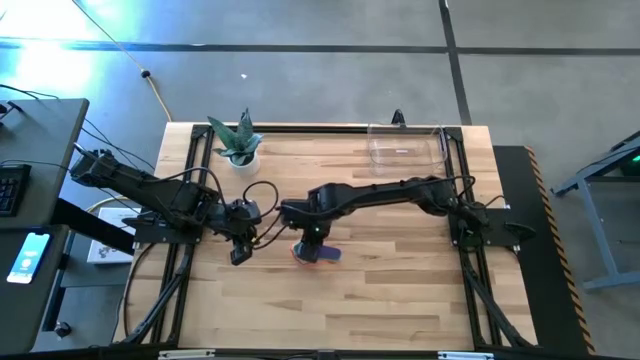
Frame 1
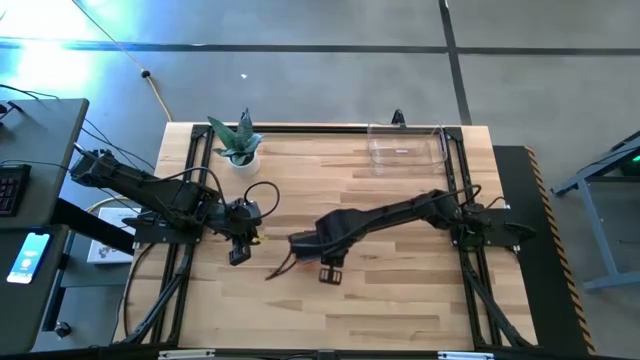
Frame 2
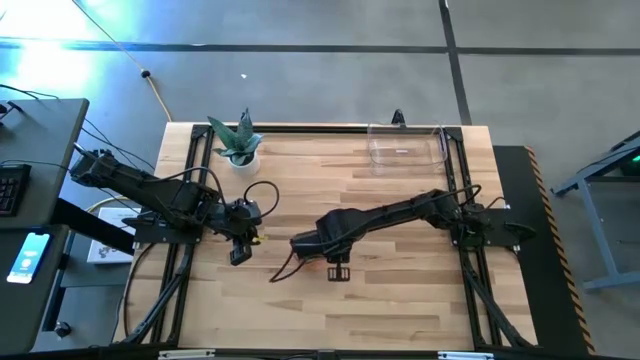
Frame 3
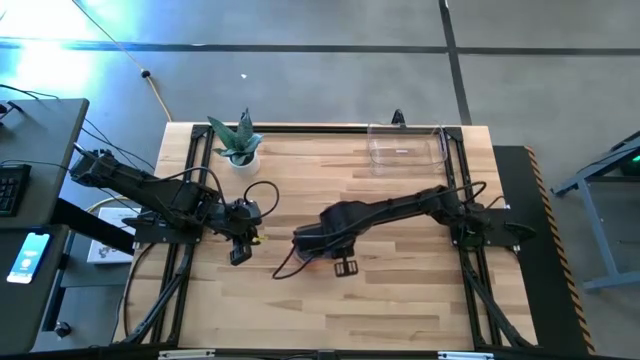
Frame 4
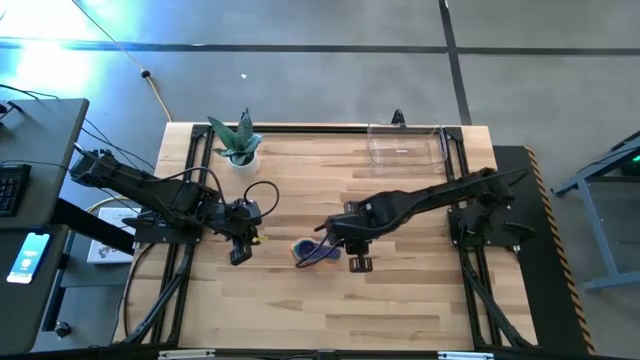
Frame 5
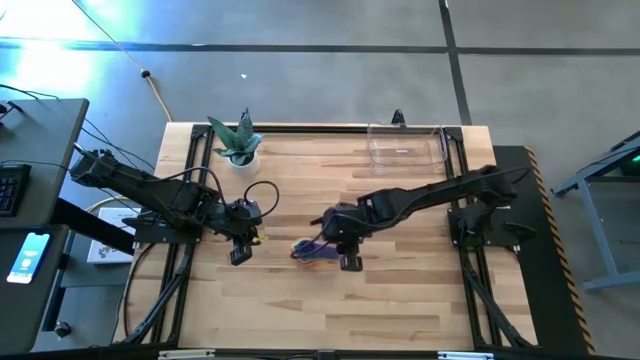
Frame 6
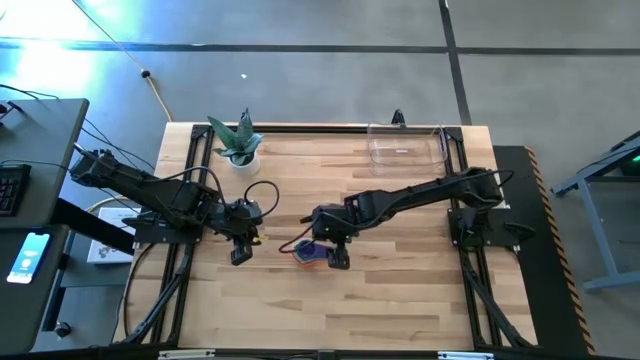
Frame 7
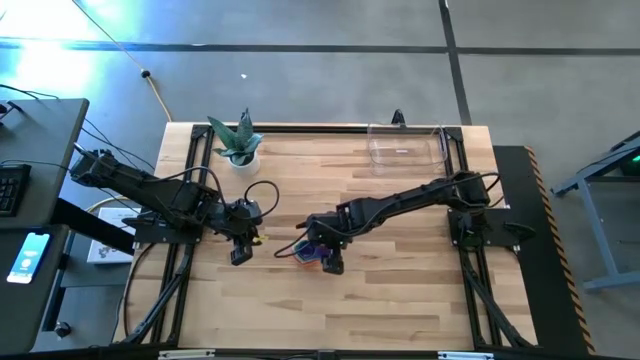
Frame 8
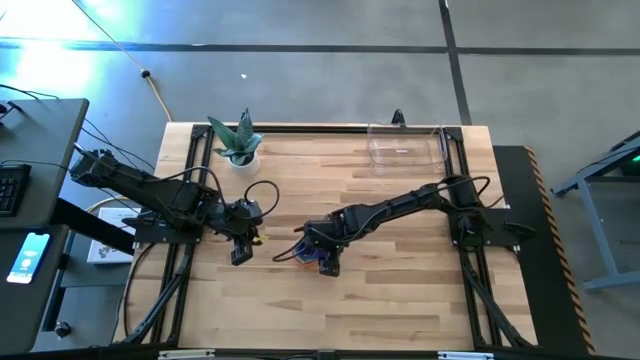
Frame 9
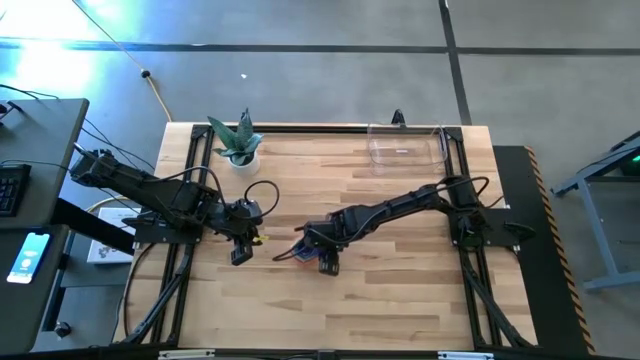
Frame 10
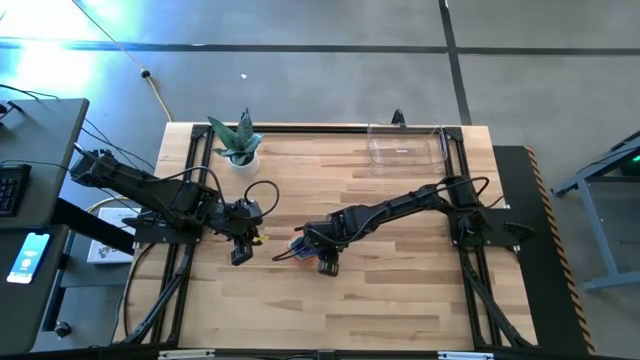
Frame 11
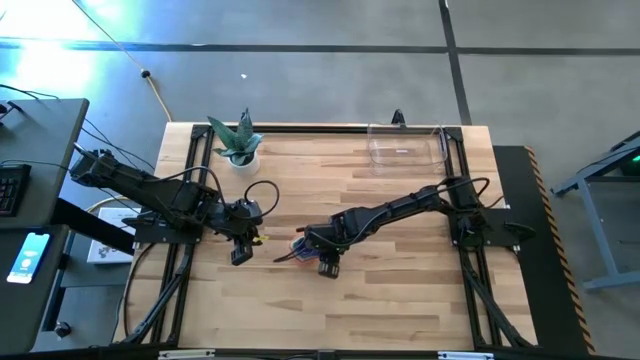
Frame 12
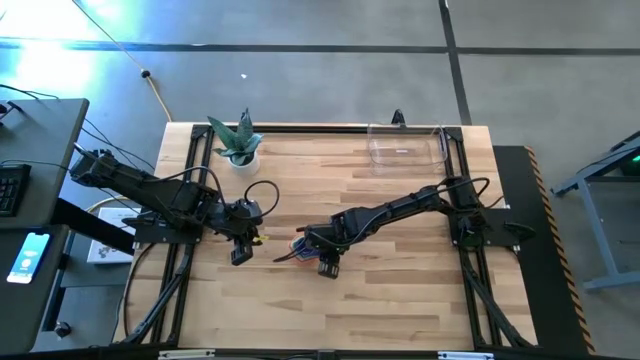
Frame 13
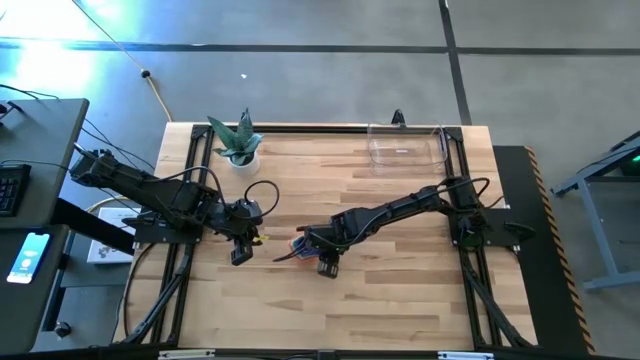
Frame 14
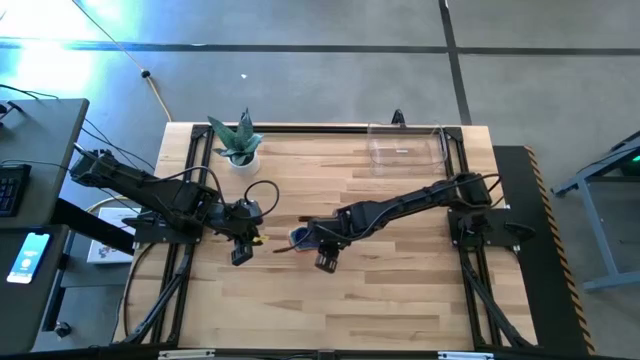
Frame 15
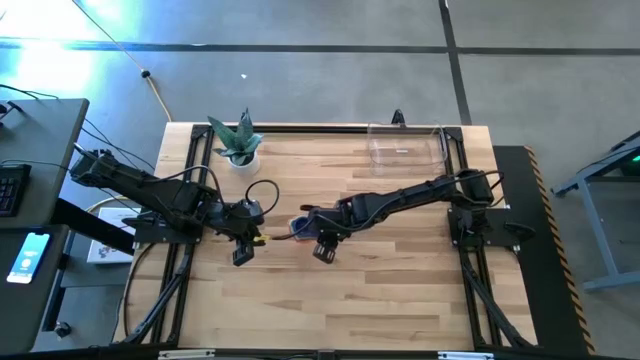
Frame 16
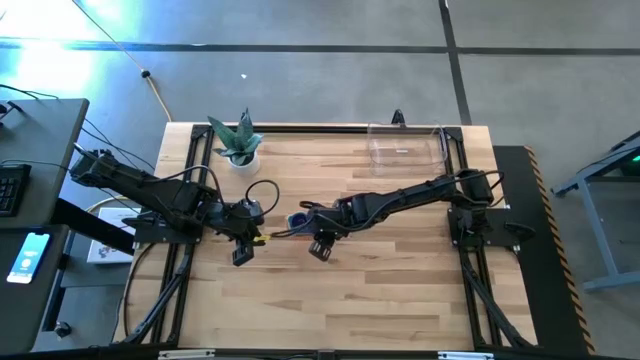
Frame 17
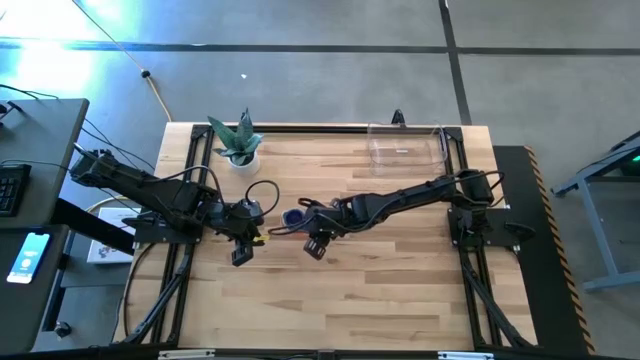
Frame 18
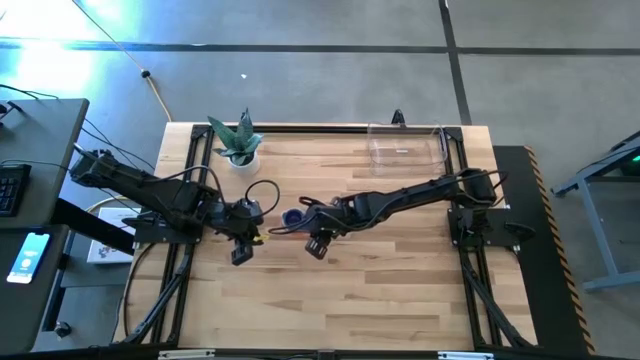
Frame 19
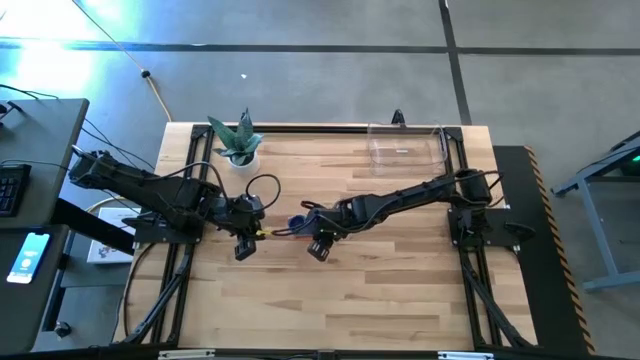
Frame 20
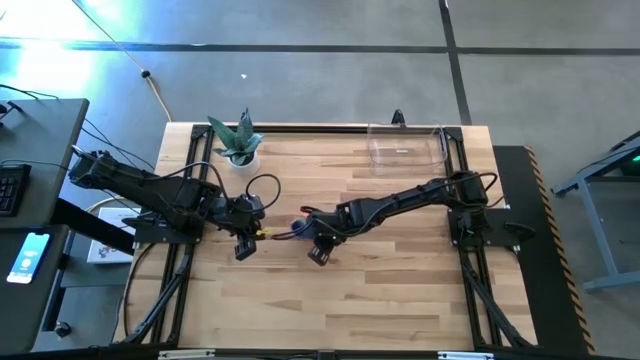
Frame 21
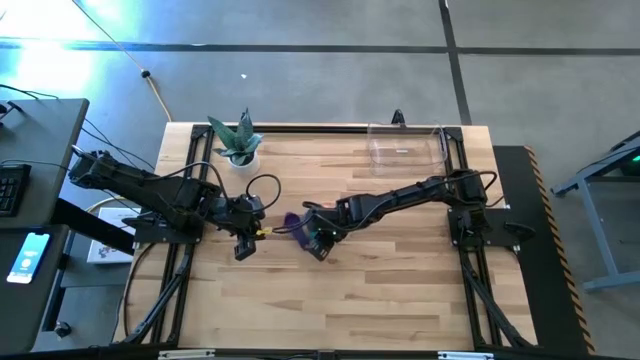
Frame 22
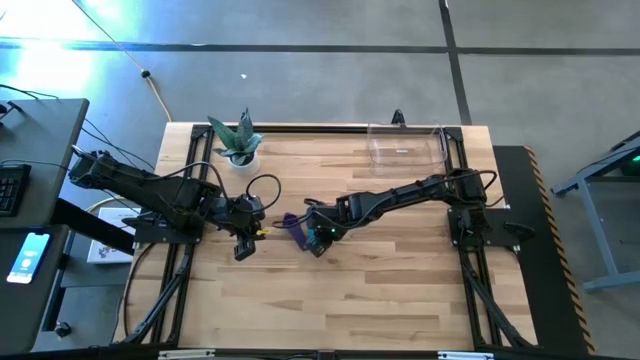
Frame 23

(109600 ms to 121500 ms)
Task: Nest measuring cups in basket
Put the measuring cups into the bin
